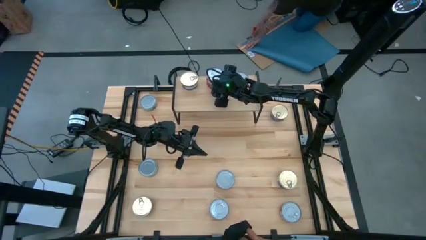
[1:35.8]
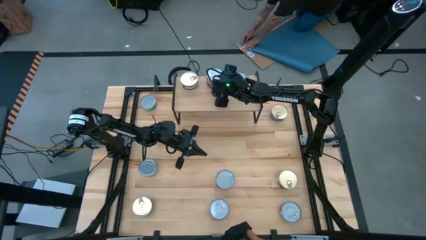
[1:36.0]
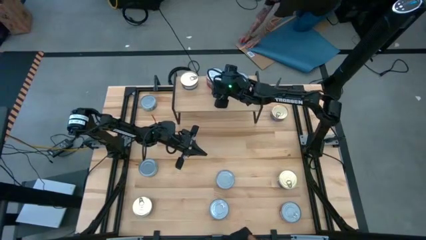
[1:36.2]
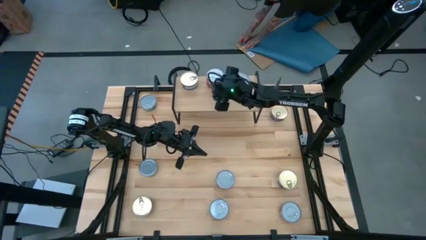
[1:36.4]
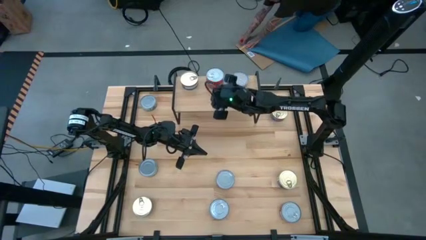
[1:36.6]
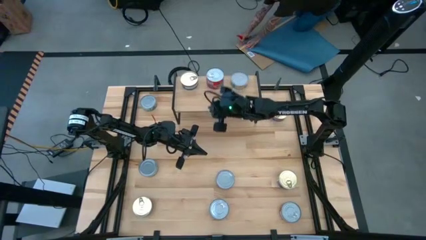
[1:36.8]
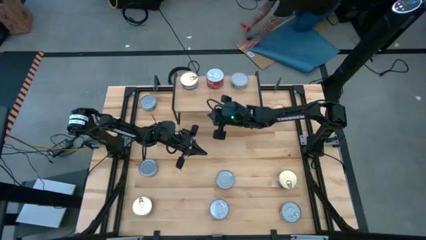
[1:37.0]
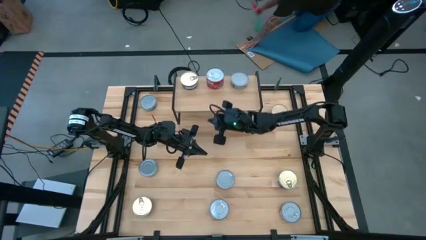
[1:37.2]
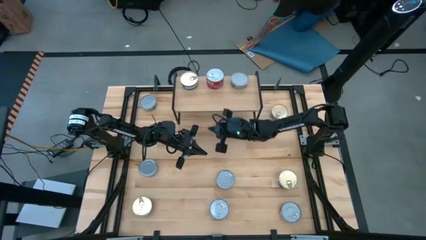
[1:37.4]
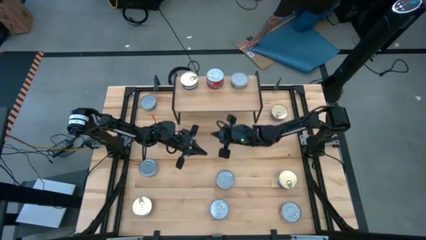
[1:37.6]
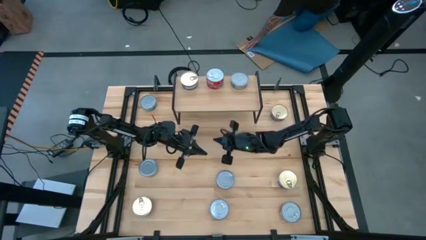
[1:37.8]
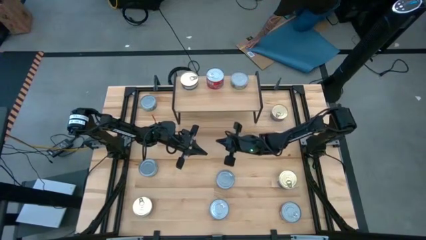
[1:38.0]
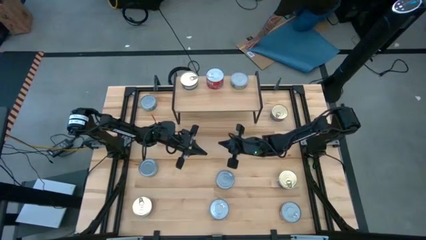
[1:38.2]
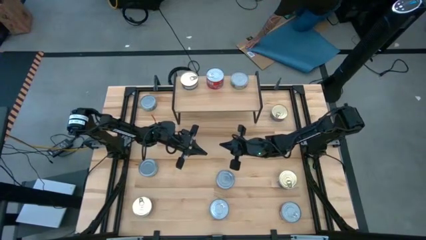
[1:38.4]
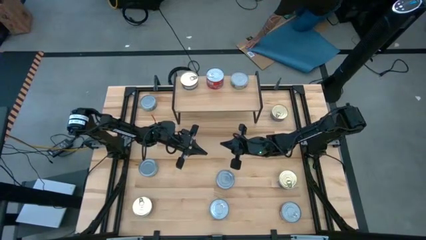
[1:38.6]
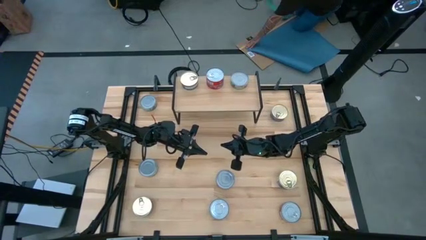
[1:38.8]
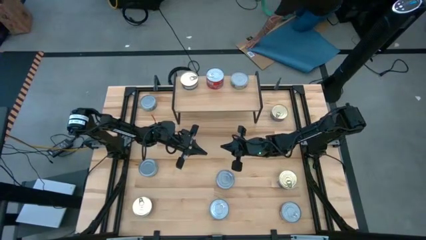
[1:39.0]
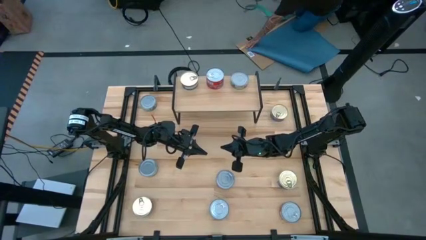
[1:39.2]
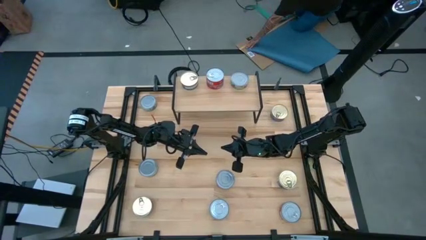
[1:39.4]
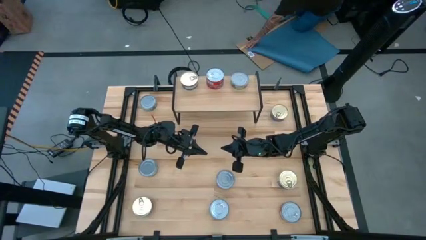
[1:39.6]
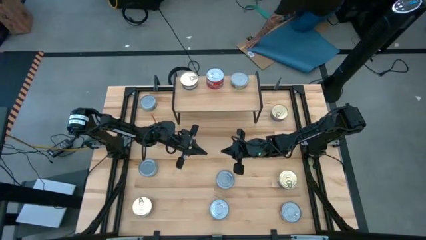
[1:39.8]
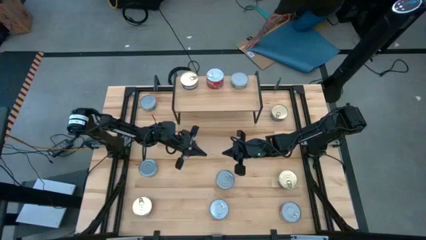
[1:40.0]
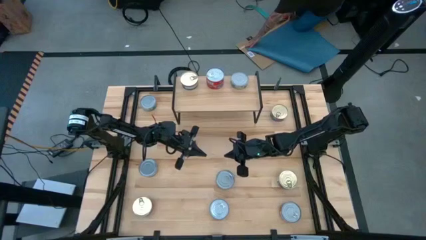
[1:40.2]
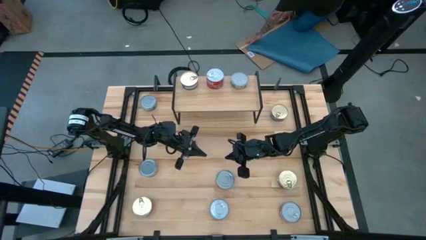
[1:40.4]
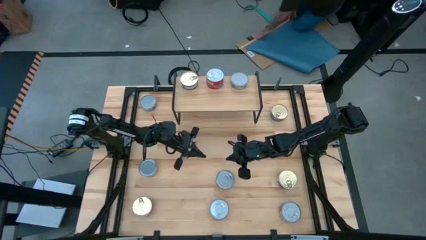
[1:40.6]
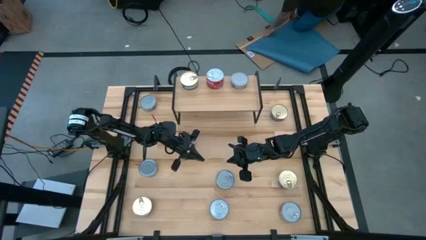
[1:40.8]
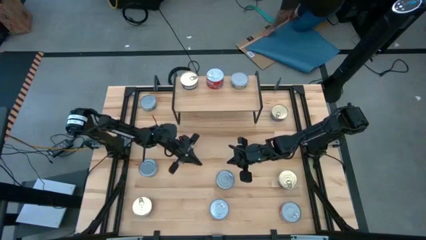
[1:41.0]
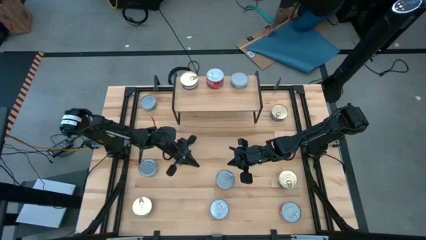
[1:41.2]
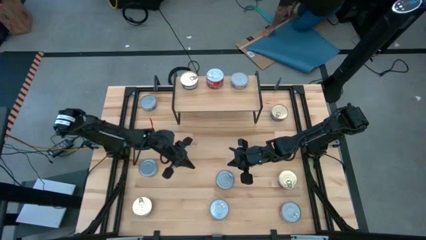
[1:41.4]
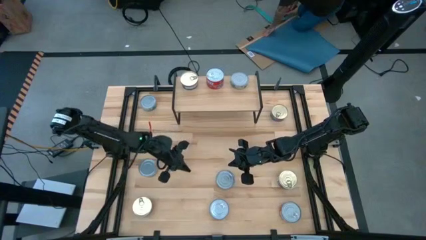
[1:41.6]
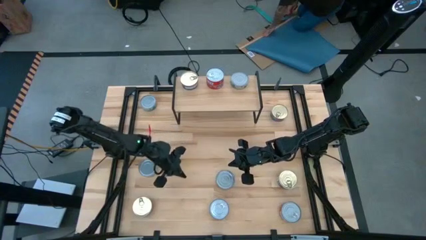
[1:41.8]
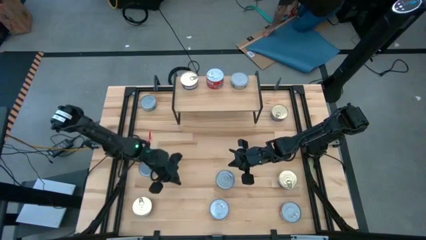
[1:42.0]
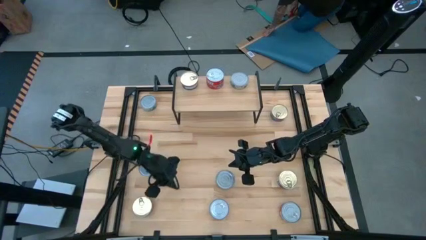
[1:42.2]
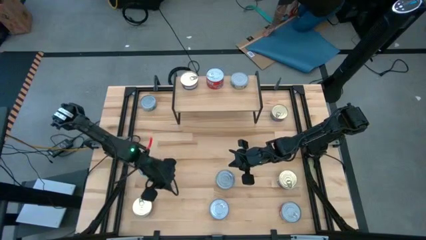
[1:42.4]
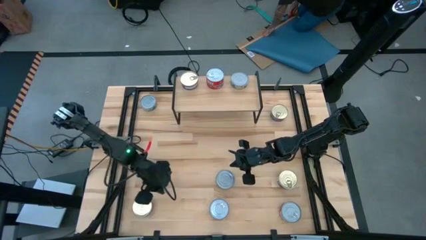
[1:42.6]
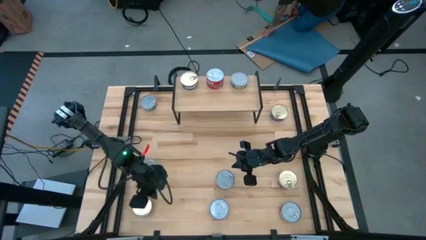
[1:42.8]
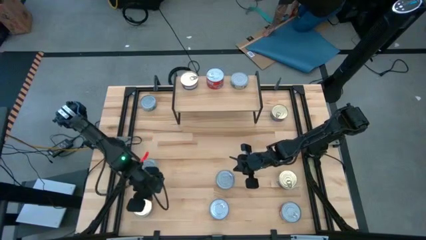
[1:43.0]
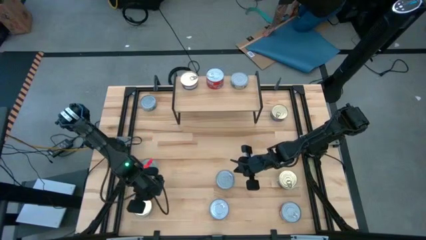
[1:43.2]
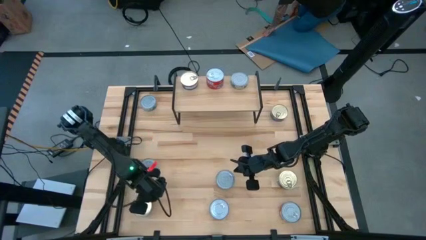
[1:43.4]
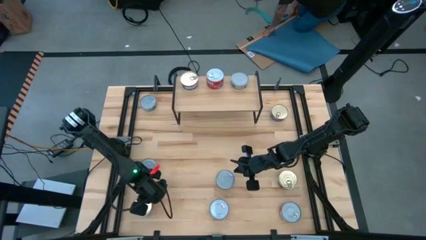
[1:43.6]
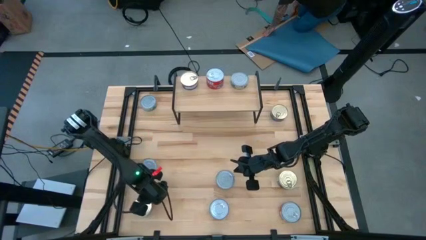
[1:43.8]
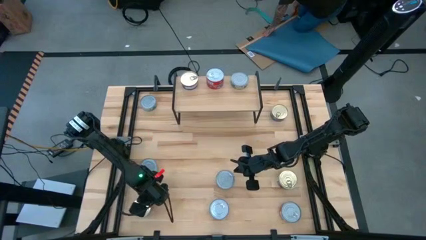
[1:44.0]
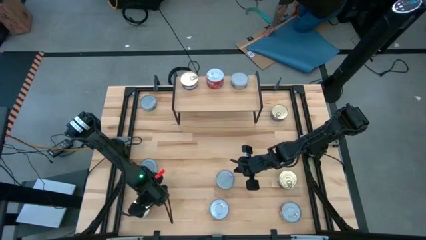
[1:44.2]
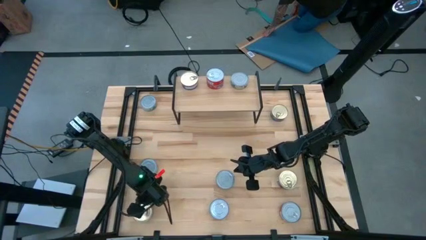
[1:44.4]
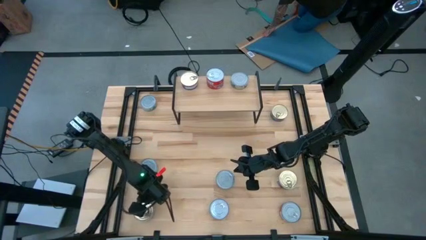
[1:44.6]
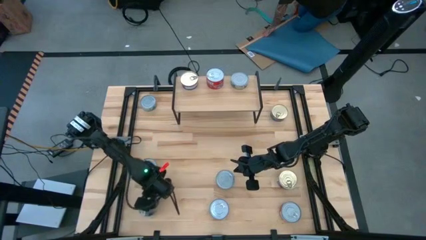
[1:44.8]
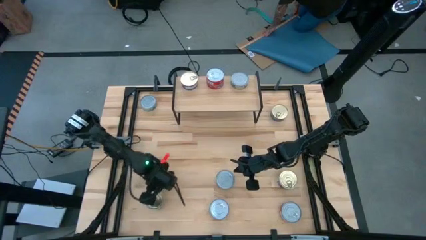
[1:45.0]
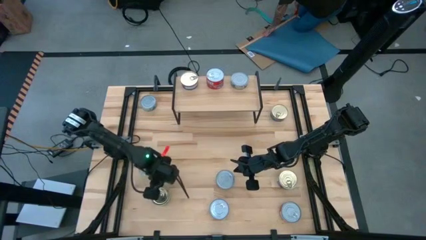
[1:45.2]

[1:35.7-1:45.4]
Task: Stack canned seafood by type on shelf
Stack the blue pink tuna can on top of the other blue pink tuna can on the shelf

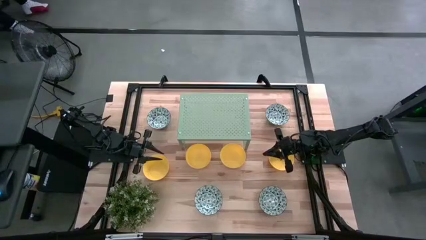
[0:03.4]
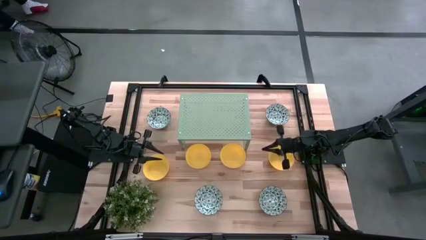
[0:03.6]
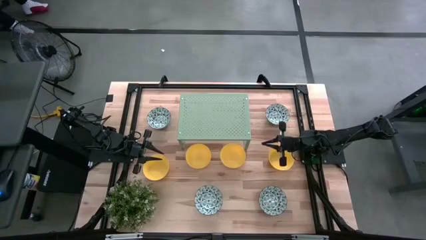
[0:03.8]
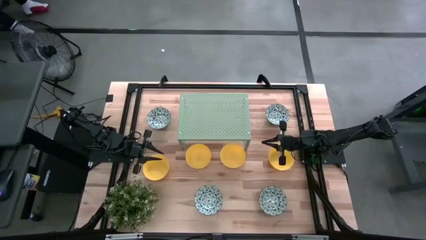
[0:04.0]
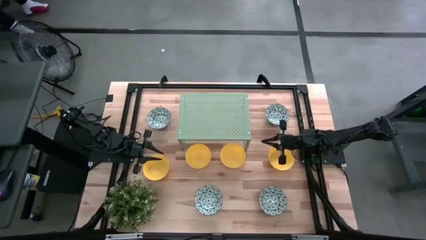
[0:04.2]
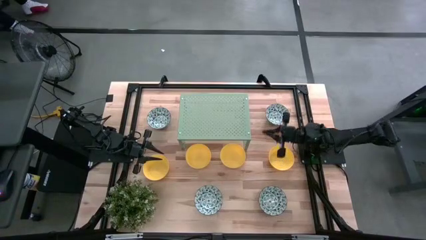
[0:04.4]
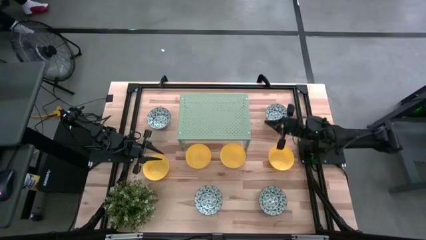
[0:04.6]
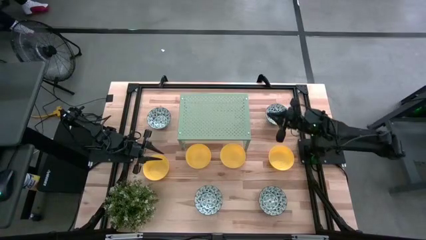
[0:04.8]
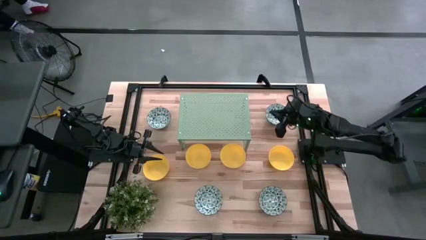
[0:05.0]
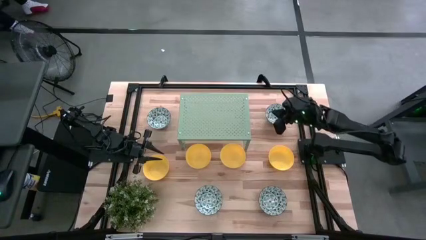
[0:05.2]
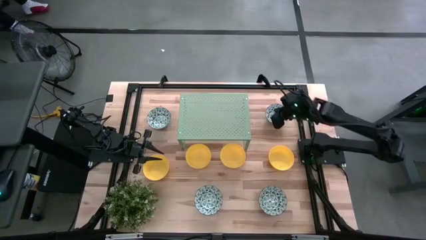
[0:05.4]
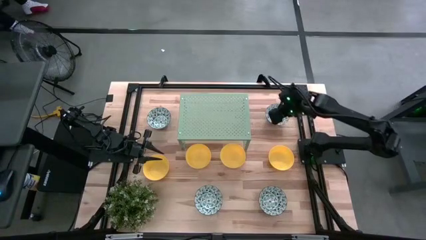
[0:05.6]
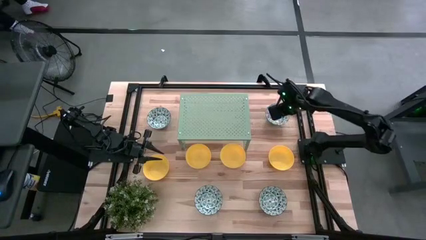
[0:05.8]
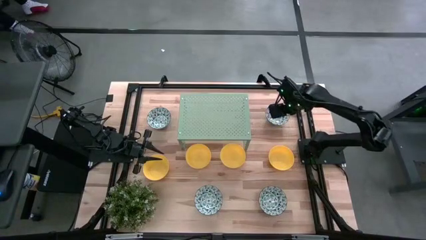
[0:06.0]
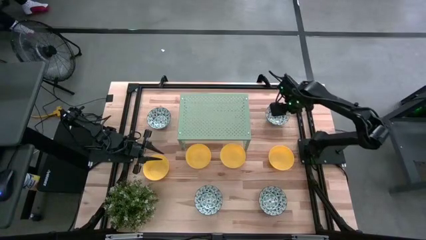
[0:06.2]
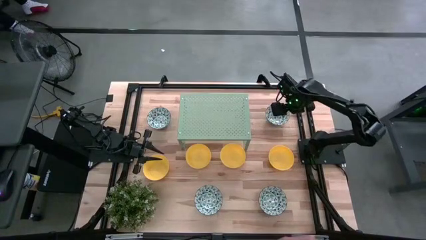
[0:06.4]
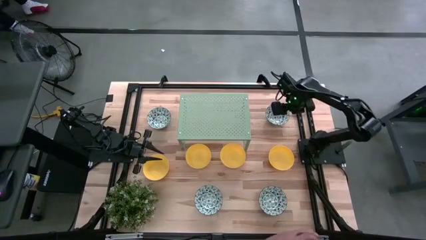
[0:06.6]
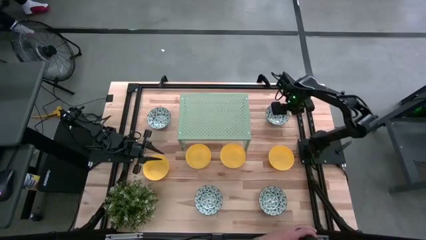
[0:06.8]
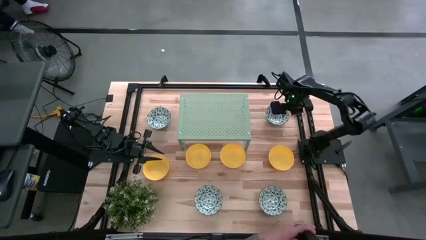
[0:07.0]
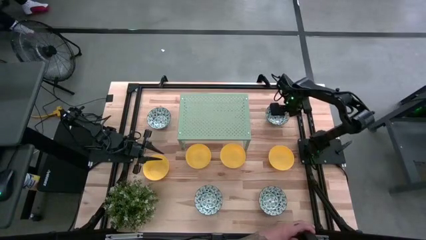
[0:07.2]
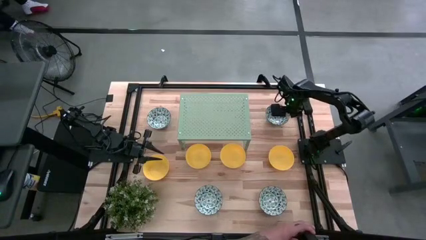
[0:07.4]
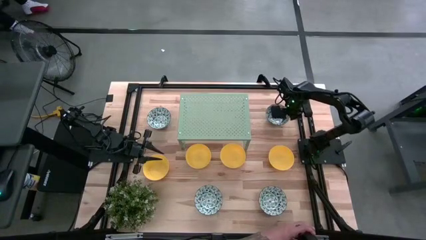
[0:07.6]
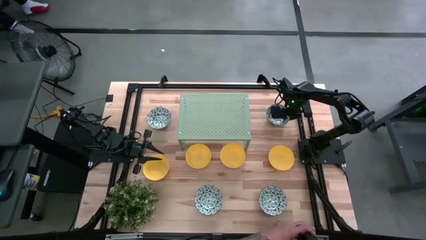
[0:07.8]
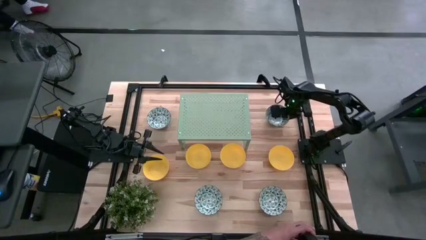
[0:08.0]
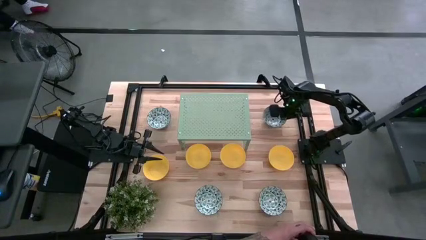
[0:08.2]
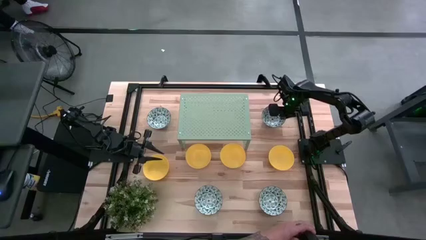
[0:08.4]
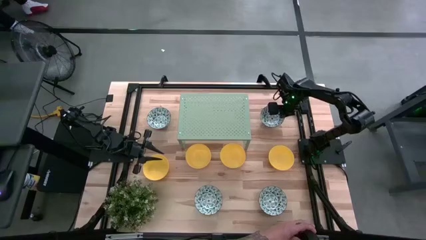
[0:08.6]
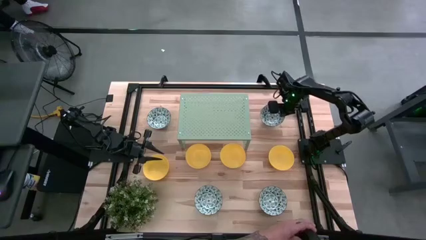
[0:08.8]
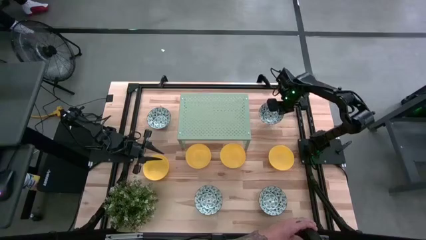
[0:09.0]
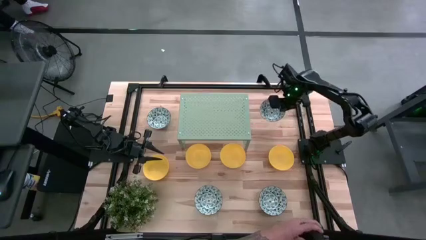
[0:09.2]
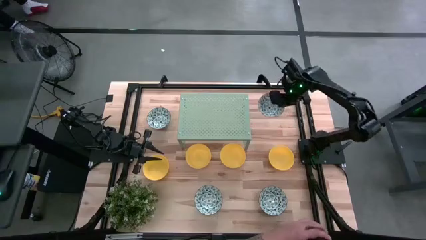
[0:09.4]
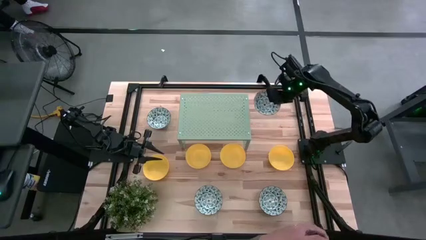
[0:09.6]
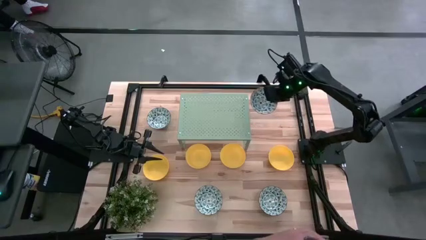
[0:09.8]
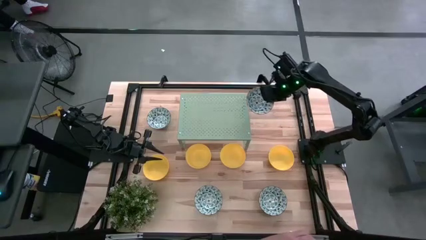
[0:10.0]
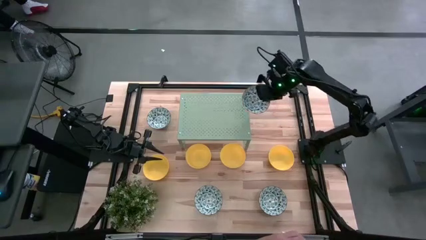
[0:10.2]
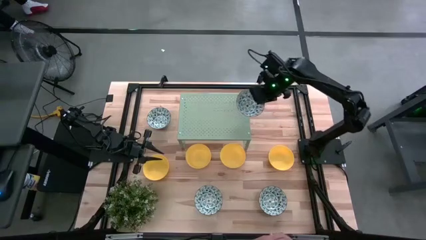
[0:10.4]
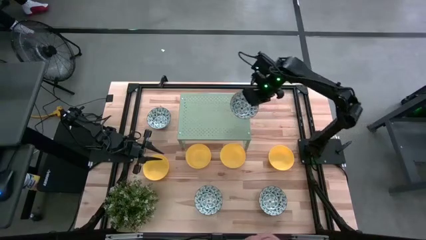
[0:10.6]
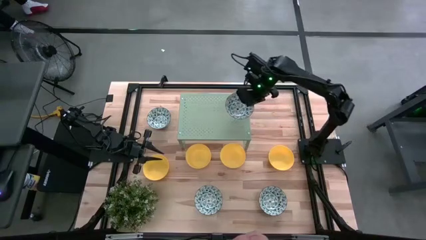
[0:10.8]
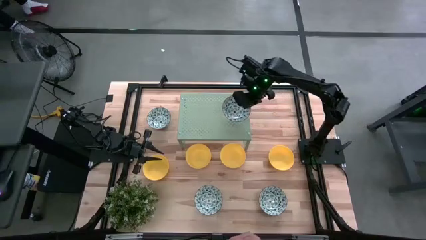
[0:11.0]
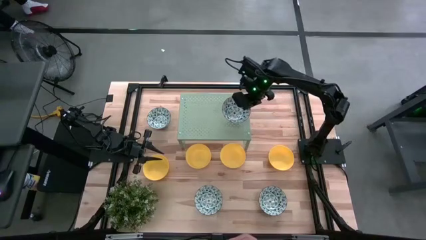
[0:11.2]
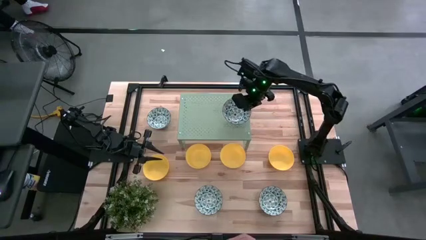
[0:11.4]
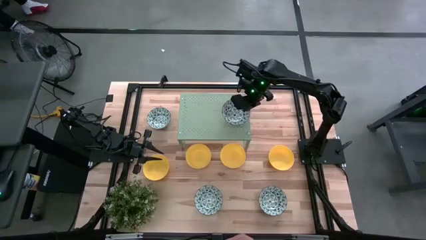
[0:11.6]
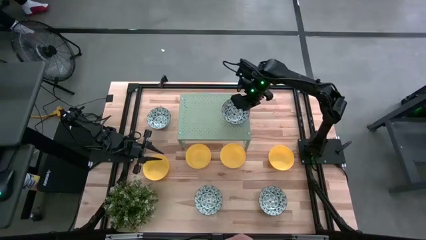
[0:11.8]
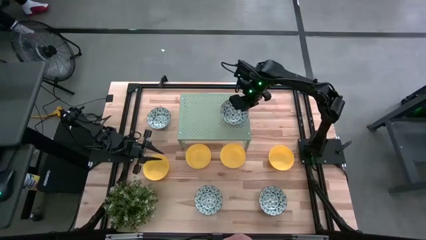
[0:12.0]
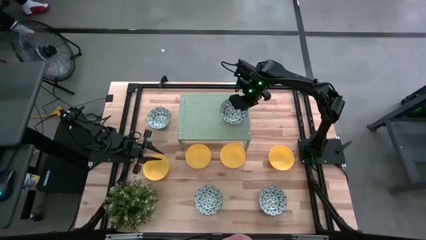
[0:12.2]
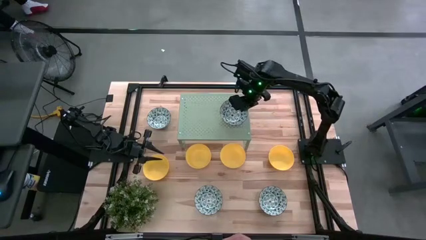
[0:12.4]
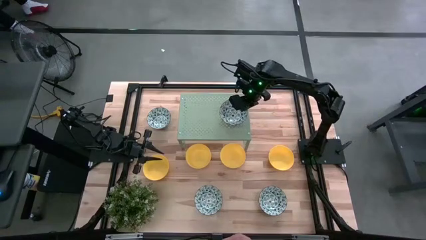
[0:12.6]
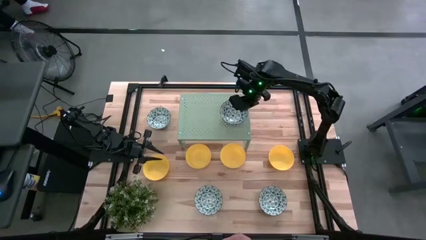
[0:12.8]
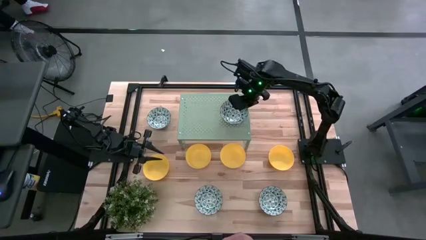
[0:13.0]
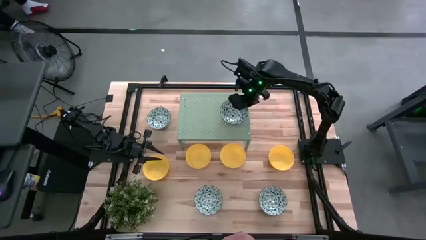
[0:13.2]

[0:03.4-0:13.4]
Task: Pick & Place Mini bowls
Put the blue bowl on the shelf
